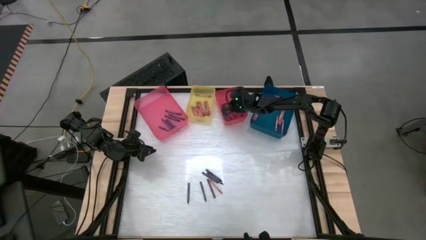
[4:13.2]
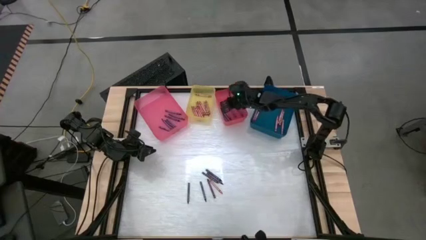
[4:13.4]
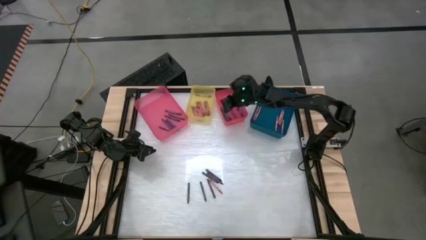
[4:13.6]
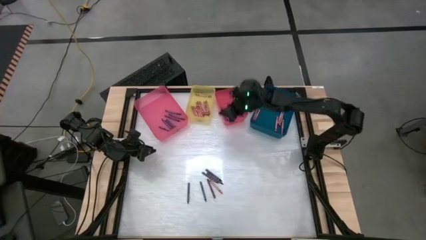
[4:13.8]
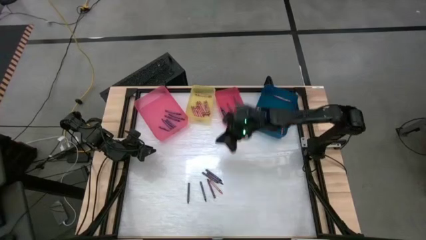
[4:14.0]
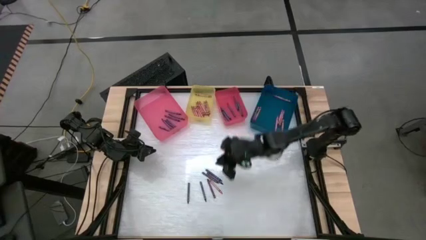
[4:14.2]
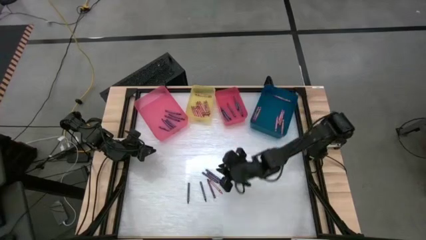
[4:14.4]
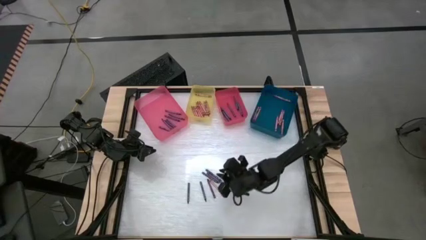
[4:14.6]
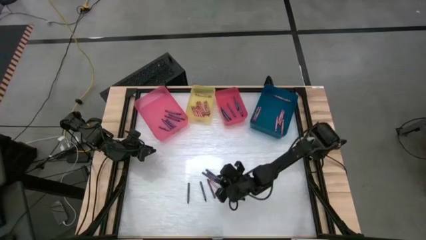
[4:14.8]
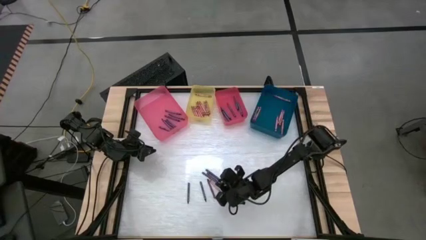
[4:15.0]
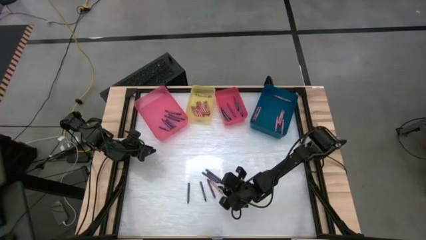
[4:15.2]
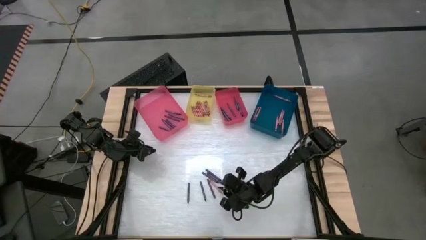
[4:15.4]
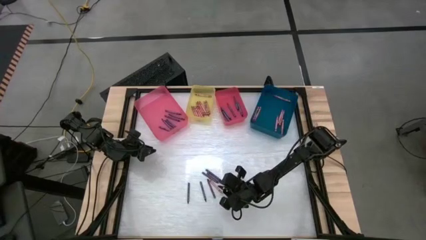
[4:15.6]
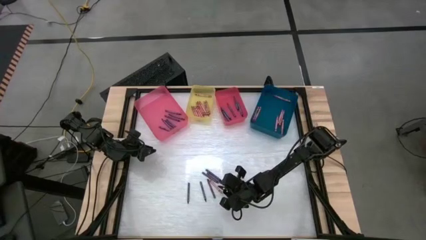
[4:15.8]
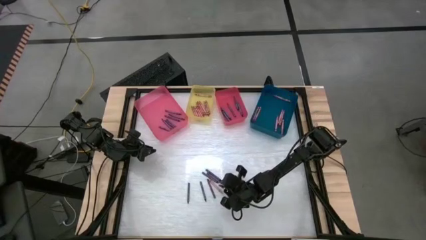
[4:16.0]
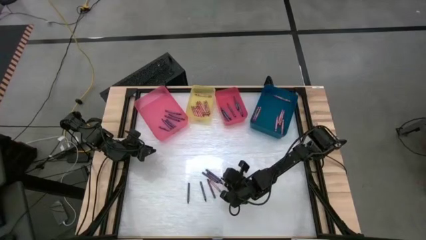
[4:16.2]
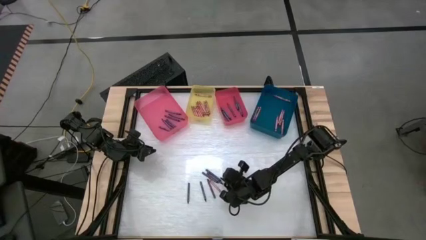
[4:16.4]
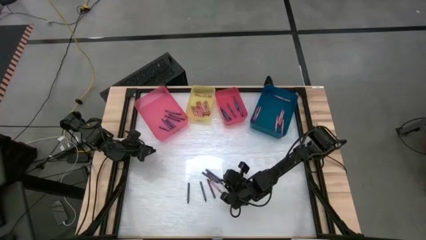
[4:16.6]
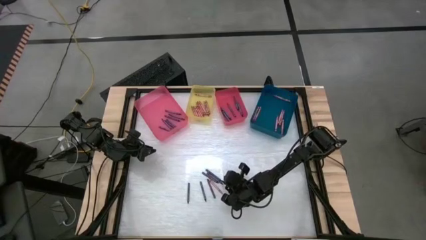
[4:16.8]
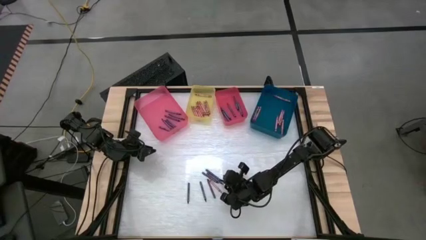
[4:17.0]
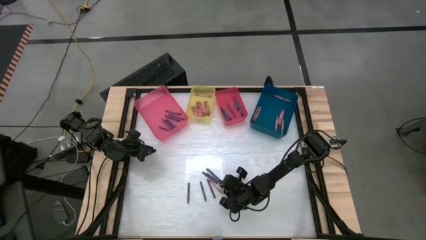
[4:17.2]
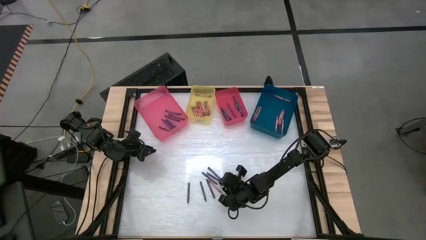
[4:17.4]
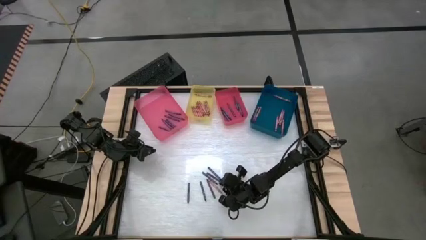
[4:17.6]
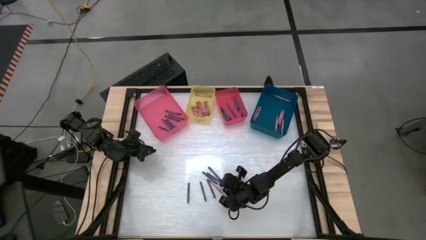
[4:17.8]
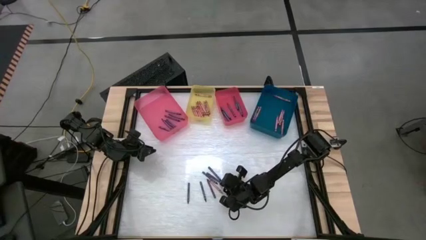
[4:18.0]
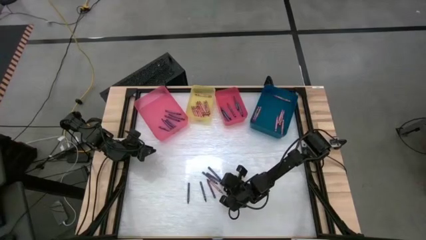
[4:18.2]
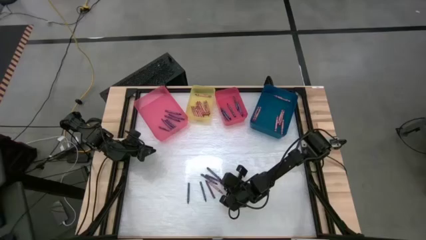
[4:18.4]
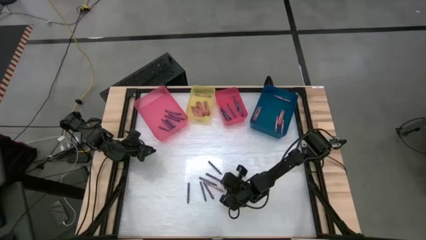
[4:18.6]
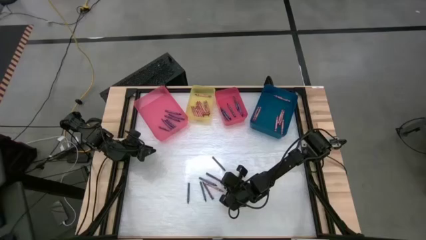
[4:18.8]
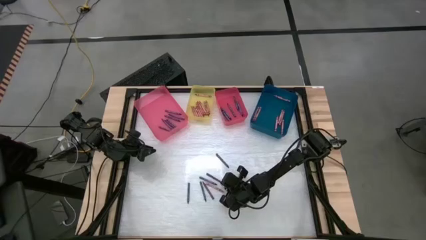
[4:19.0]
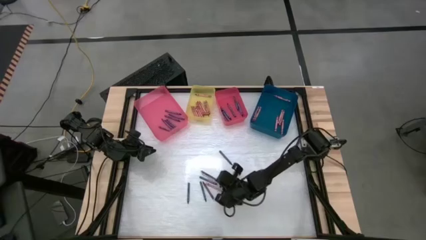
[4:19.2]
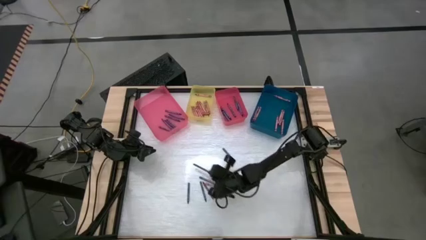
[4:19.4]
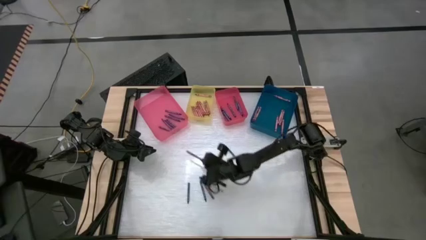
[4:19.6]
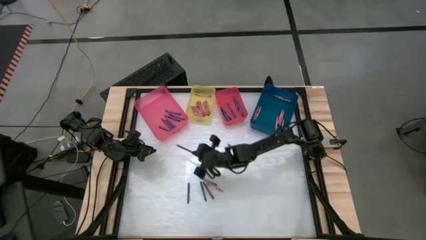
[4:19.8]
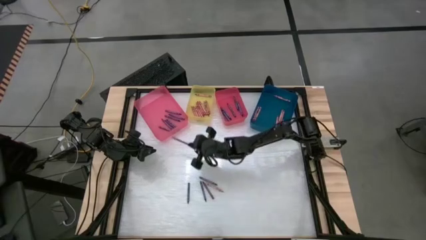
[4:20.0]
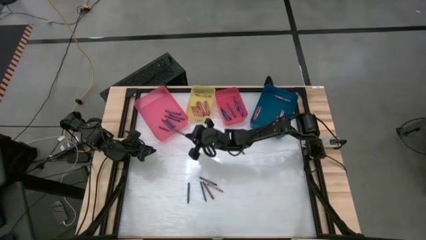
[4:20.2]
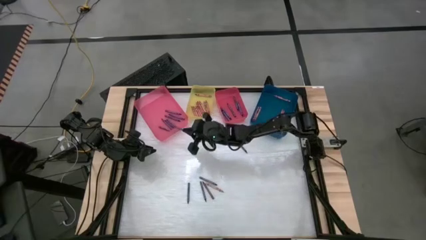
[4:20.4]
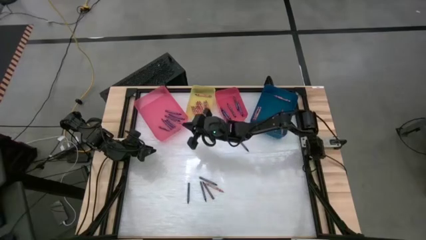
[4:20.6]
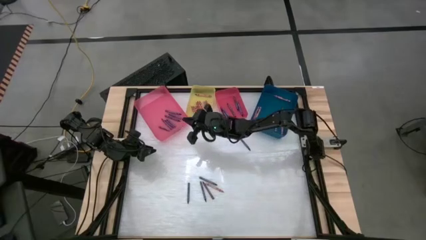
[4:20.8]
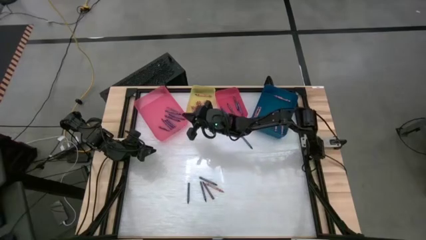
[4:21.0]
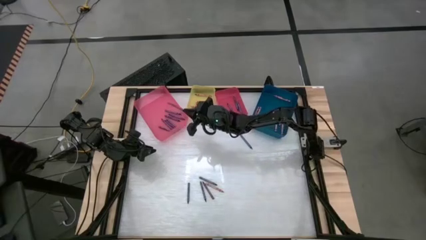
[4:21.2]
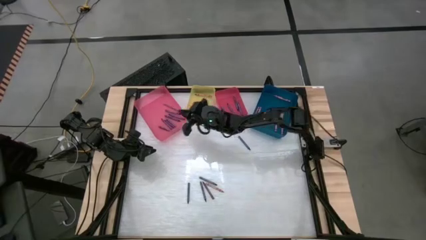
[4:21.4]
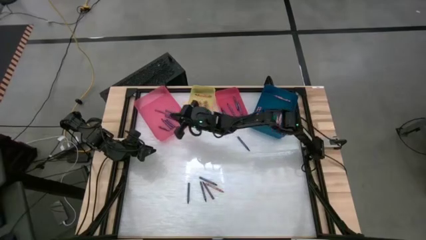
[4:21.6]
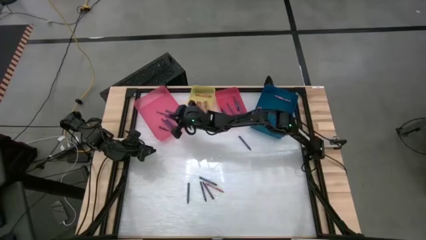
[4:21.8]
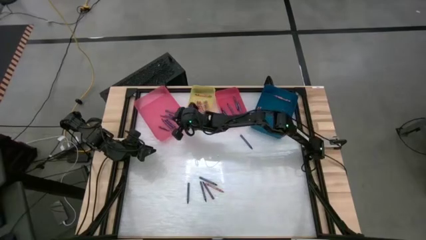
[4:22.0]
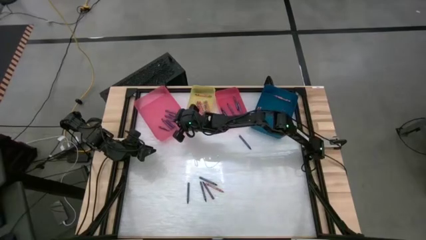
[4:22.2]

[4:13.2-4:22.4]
Task: Sort crayons
Put the violet crayon into the pink bin

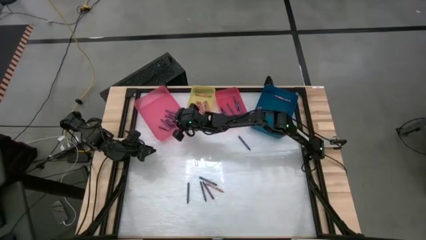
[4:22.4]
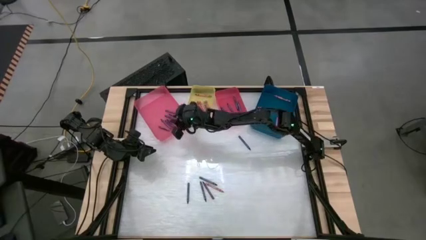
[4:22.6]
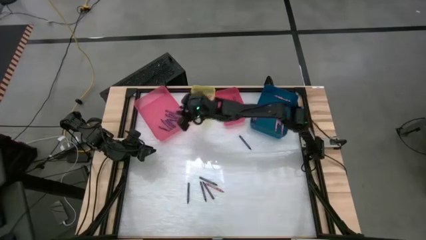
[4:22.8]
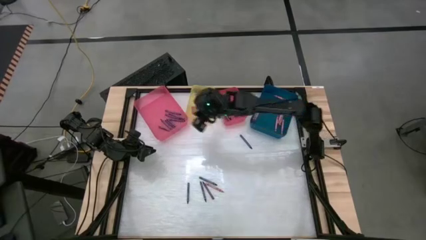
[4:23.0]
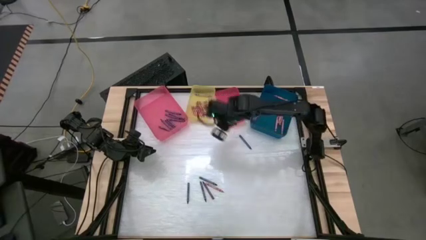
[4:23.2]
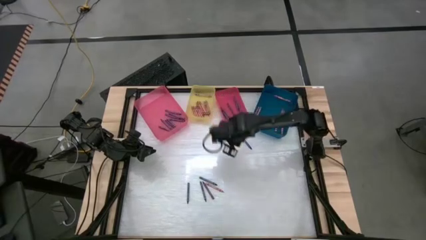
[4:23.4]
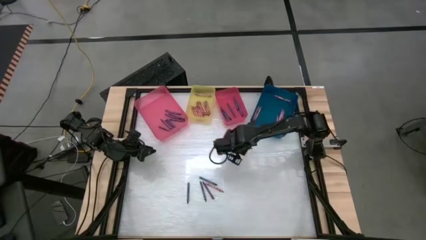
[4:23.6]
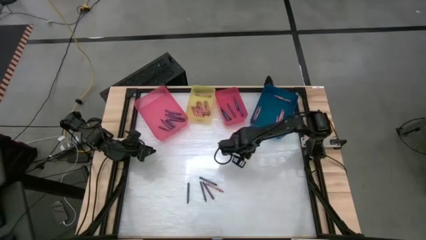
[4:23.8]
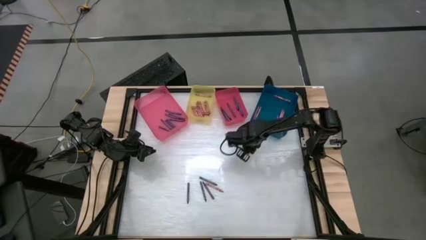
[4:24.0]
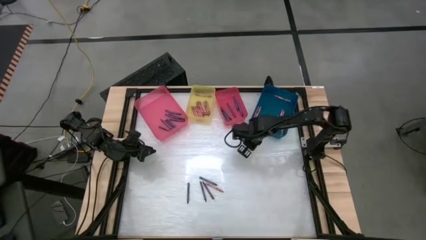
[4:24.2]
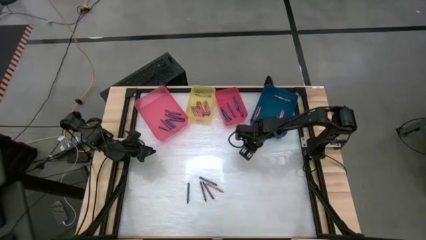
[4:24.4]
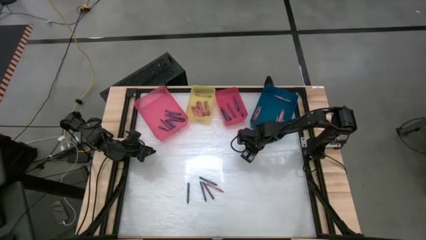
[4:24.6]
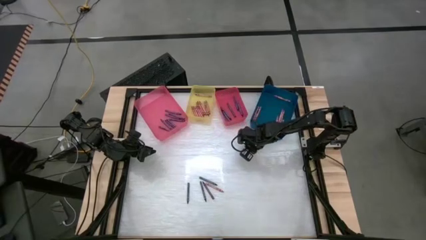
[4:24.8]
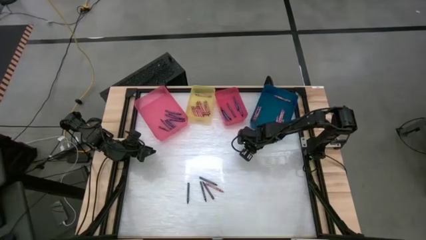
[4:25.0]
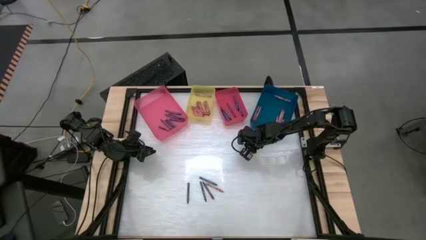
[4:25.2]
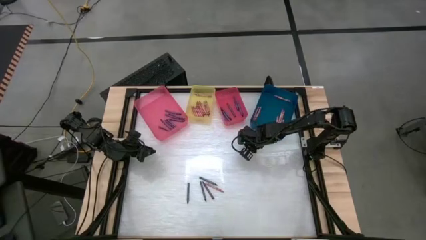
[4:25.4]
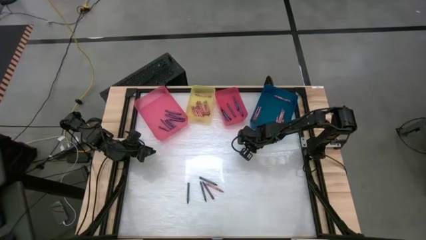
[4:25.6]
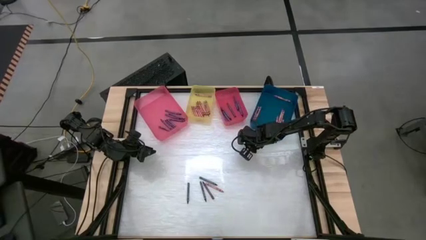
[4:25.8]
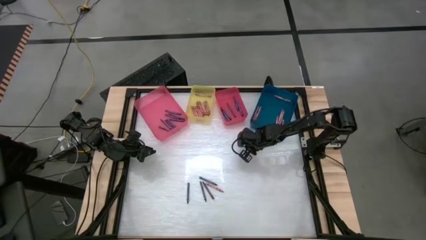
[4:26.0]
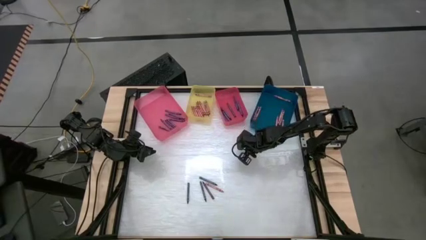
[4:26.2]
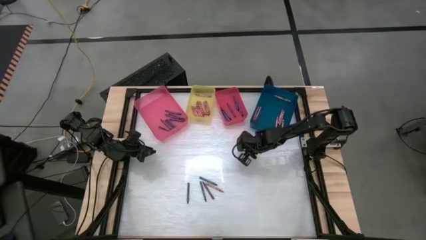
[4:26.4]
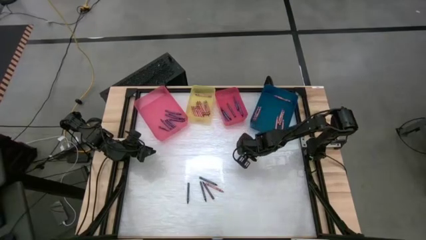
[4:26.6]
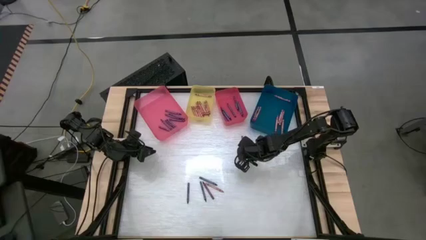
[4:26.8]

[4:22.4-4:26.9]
Put the blue crayon into the red bin
